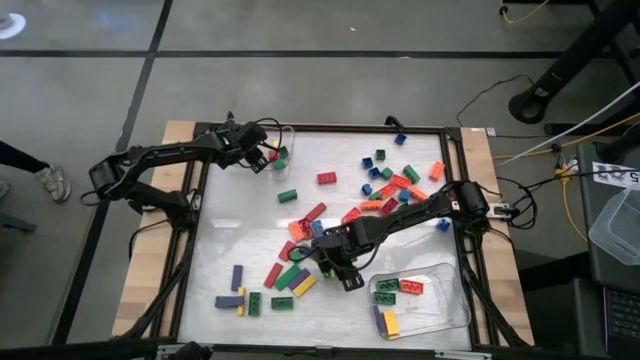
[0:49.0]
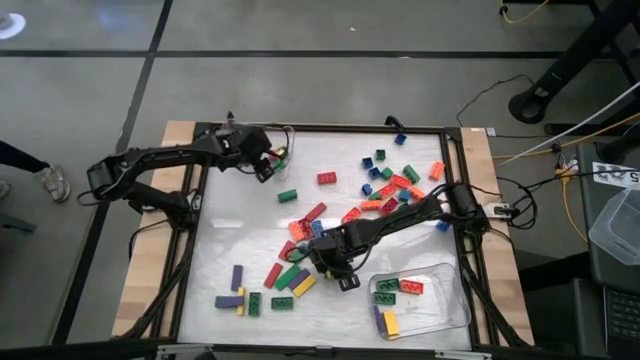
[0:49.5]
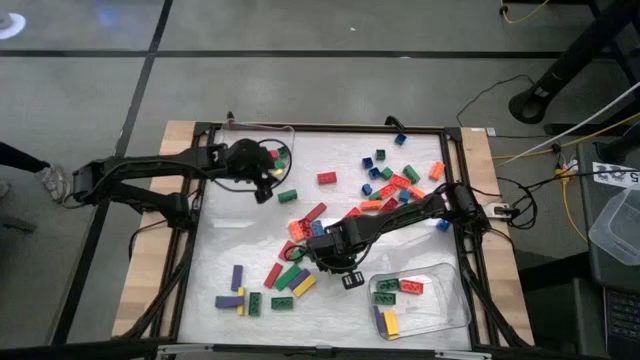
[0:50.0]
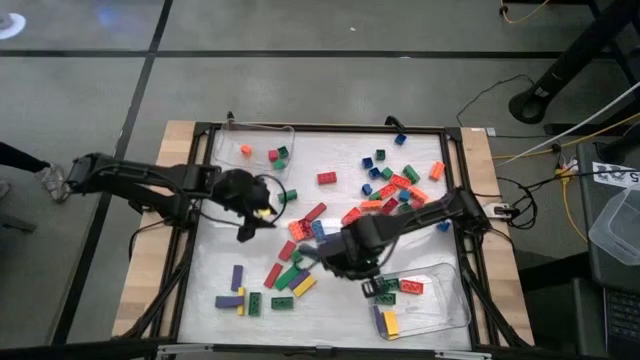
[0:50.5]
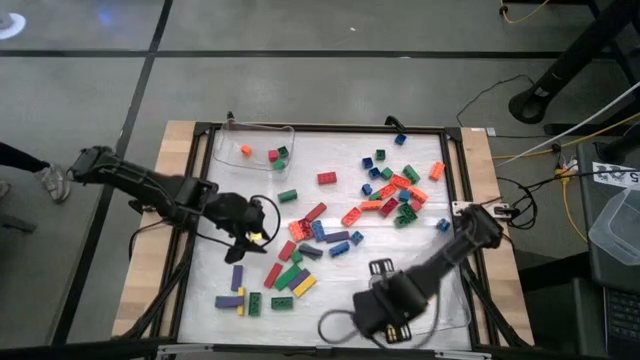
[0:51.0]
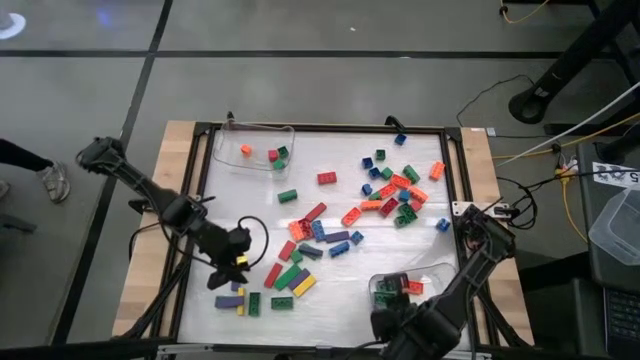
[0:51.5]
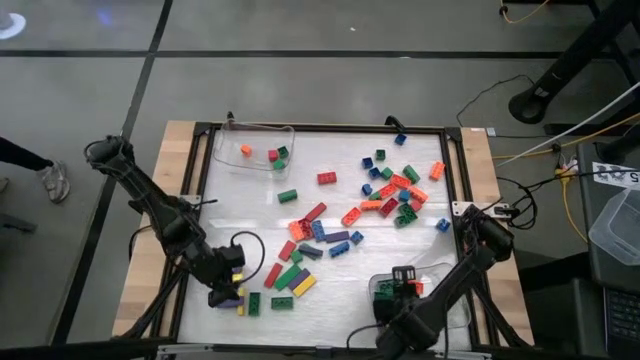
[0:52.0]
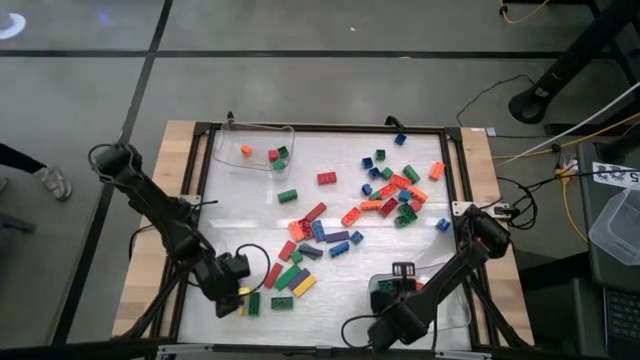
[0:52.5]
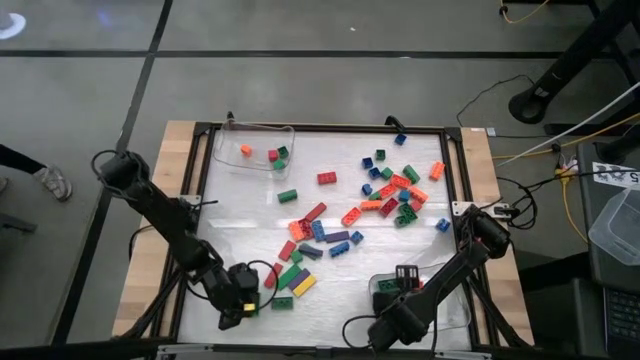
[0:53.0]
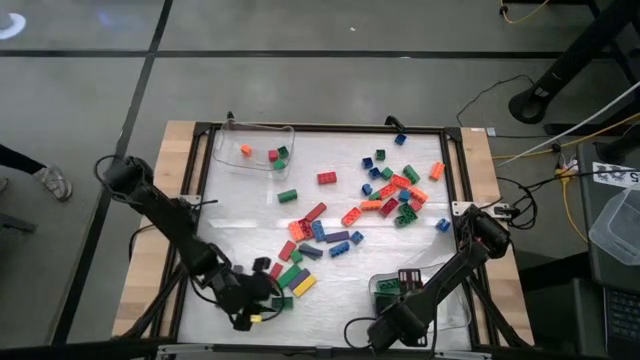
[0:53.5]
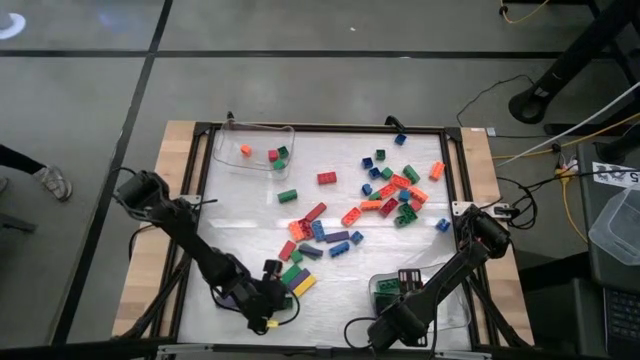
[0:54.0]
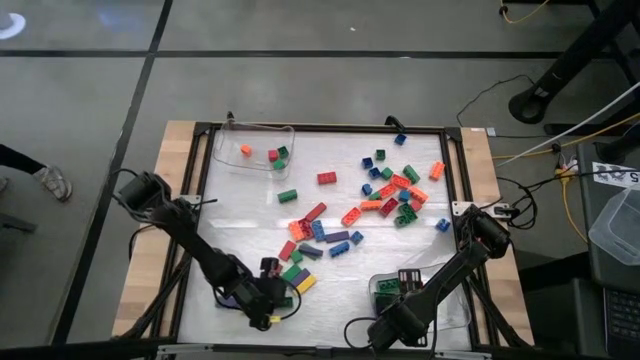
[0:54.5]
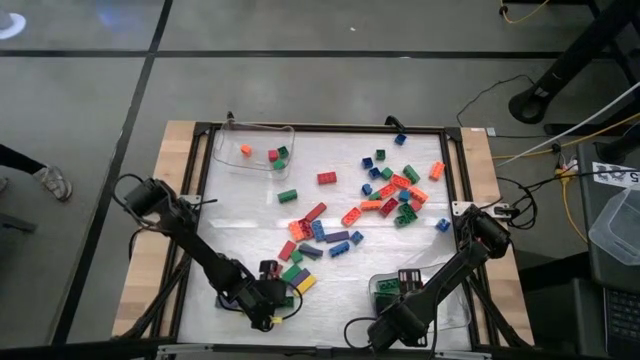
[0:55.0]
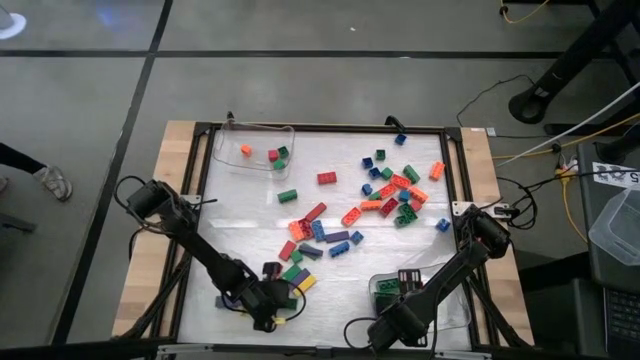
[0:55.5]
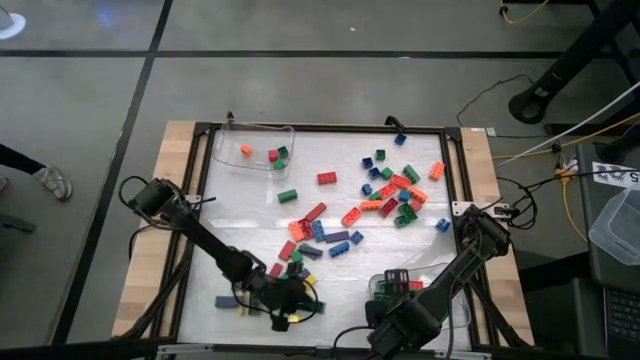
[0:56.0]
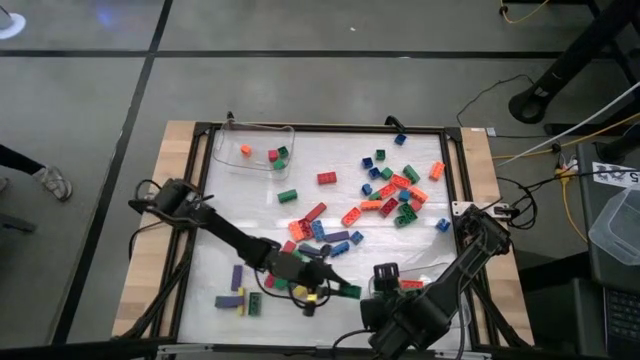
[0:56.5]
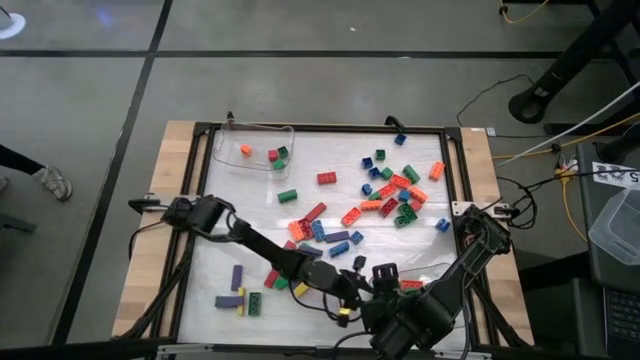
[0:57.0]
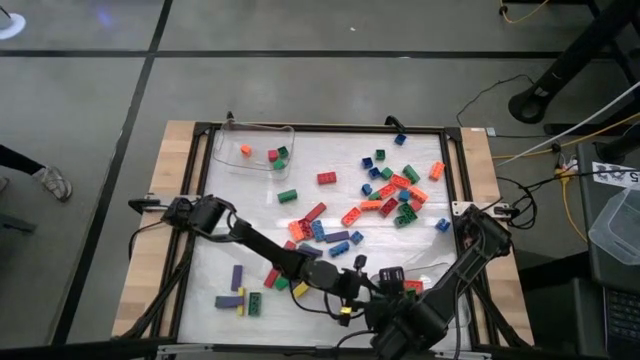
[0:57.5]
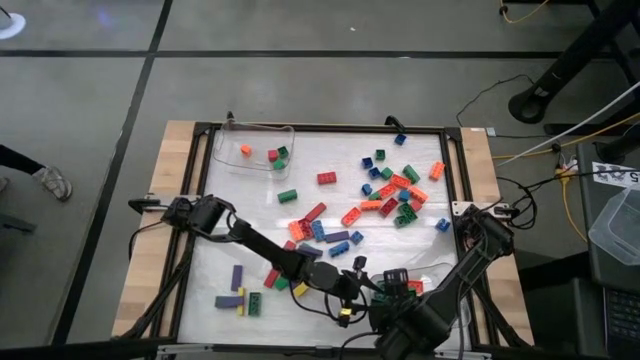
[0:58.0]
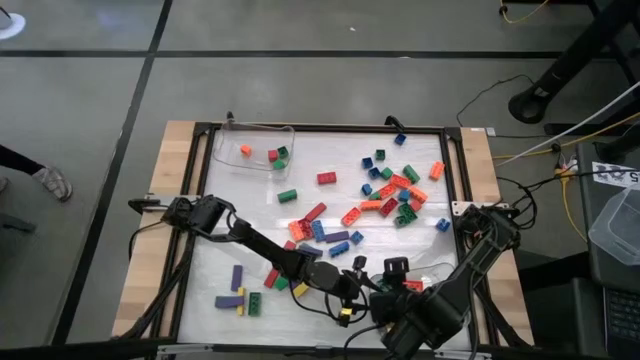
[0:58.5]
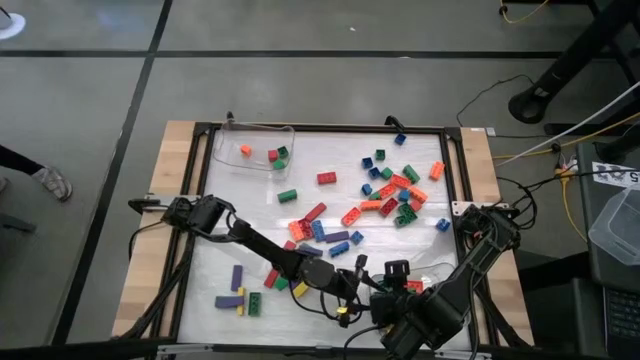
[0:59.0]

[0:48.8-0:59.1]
Task: Sort blocks by size
Put the rectangular green game piece into the bottom transparent bin

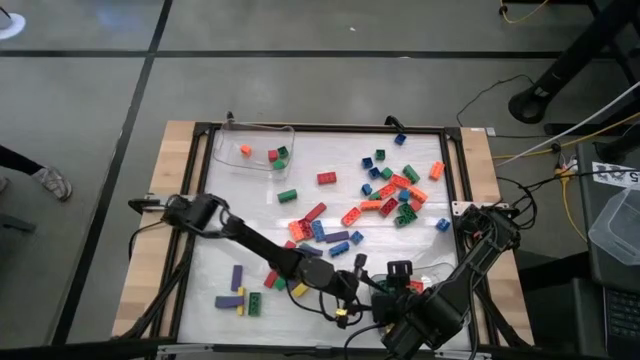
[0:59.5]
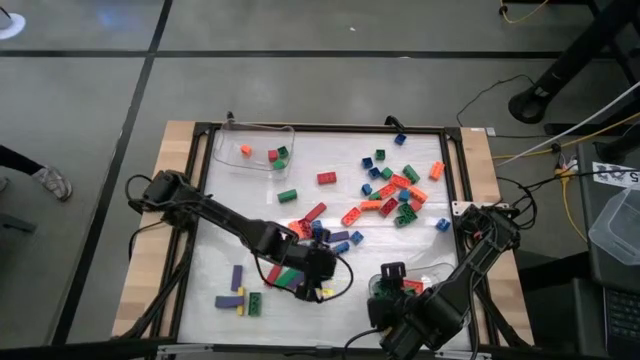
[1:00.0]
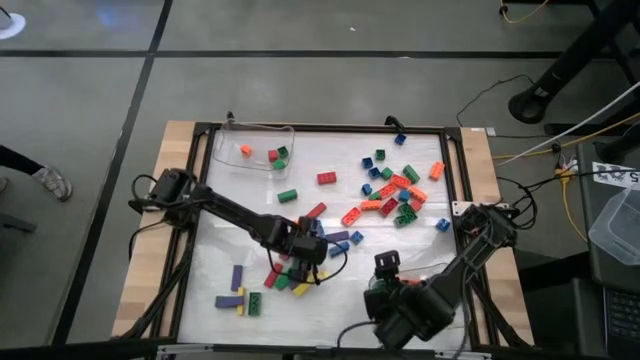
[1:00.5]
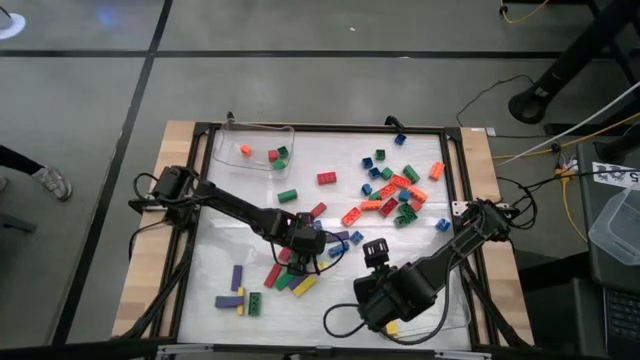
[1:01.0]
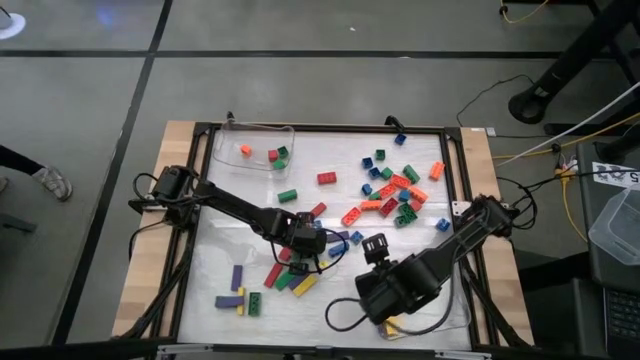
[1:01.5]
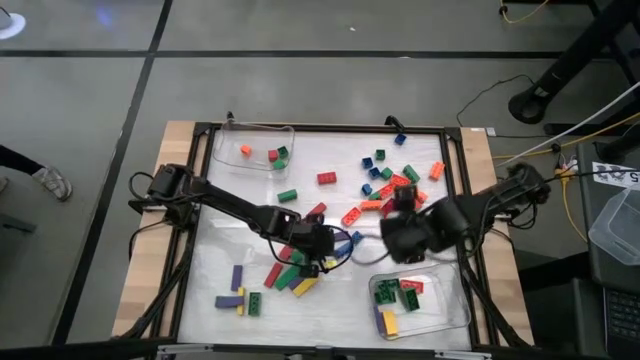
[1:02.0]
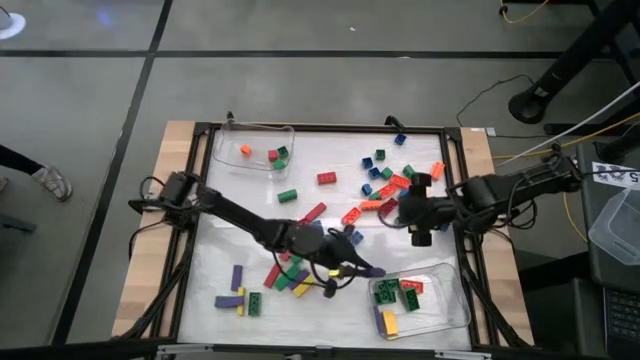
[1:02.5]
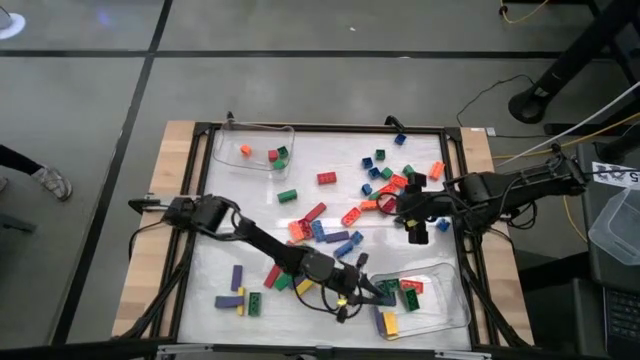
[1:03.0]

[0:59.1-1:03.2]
Put the rectangular violet block into the bottom transparent bin

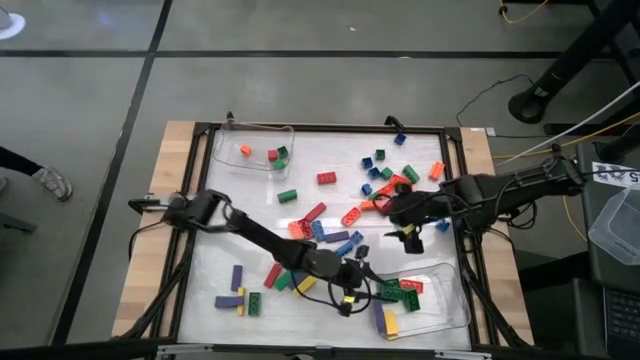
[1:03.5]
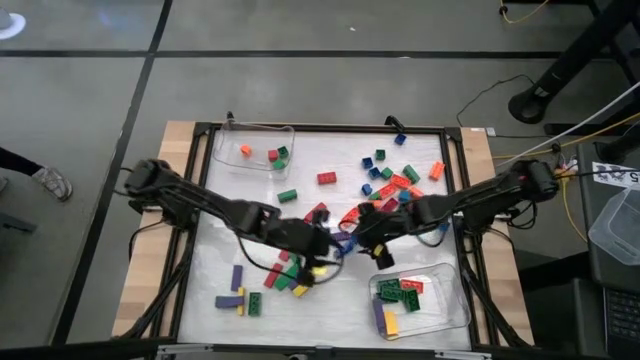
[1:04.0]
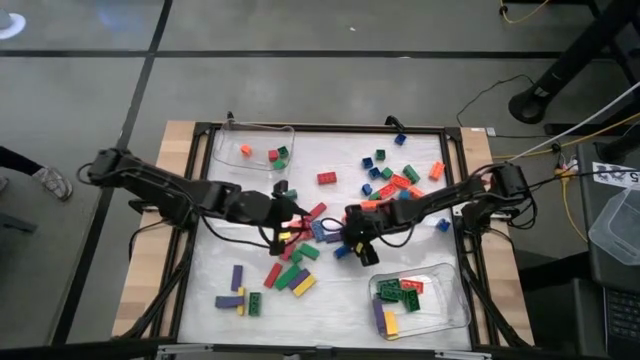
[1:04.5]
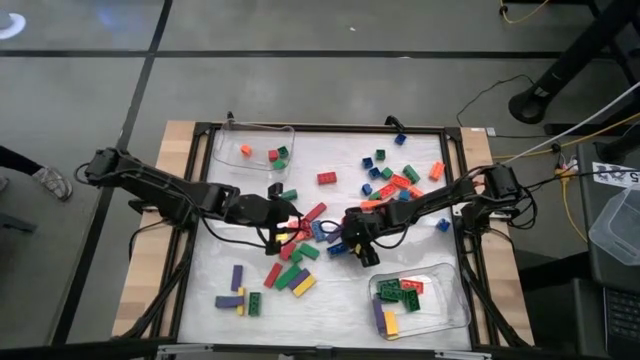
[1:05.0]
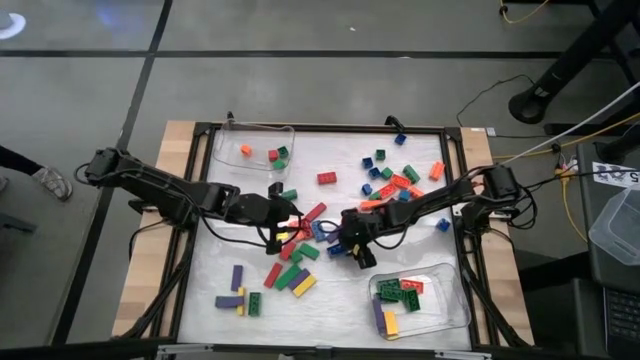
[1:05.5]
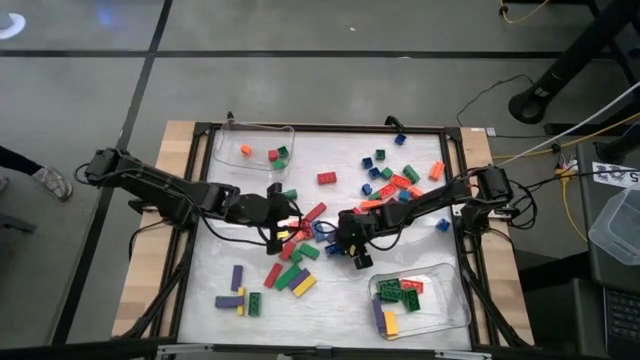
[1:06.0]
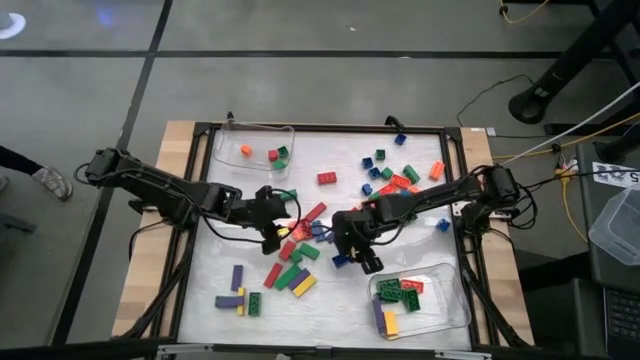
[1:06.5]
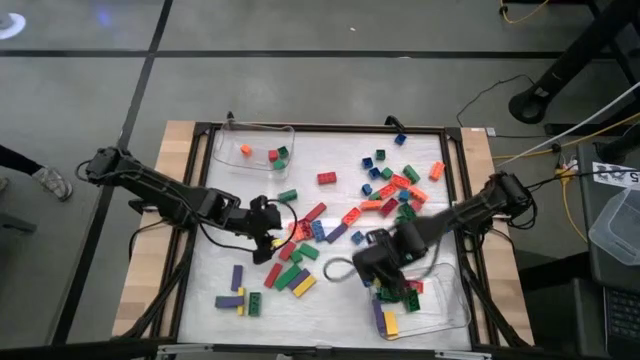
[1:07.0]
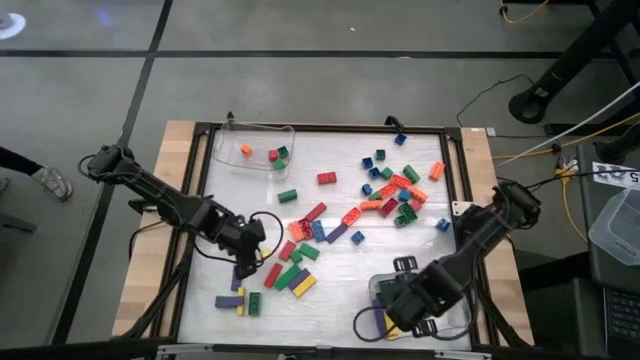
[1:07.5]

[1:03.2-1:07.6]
Put the rectangular blue game piece into the bottom transparent bin

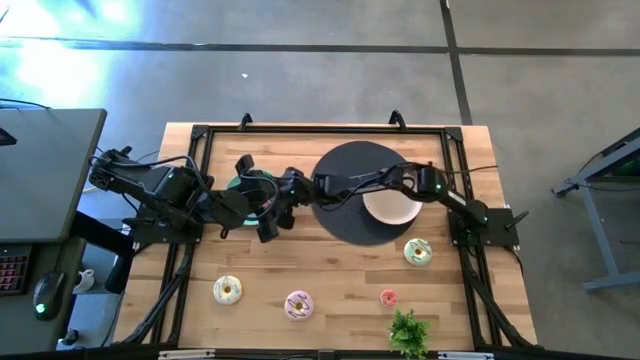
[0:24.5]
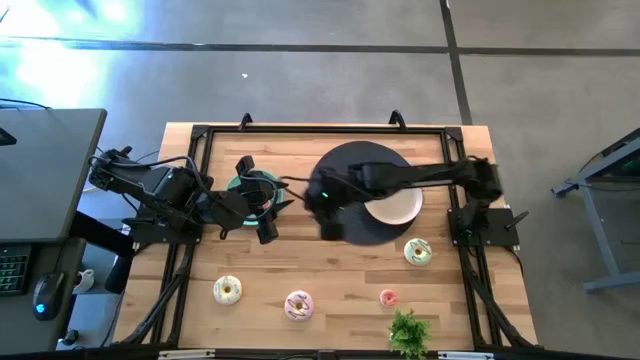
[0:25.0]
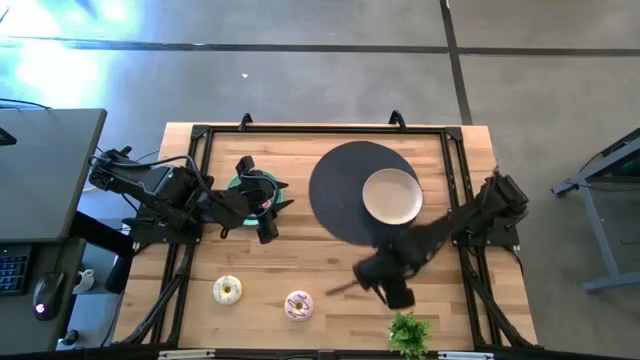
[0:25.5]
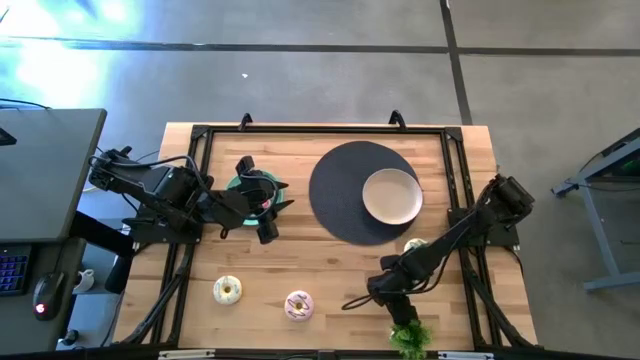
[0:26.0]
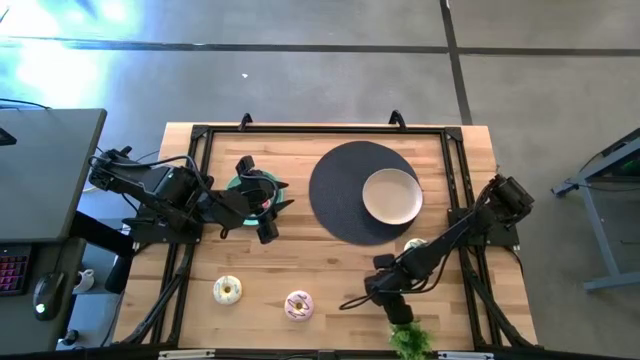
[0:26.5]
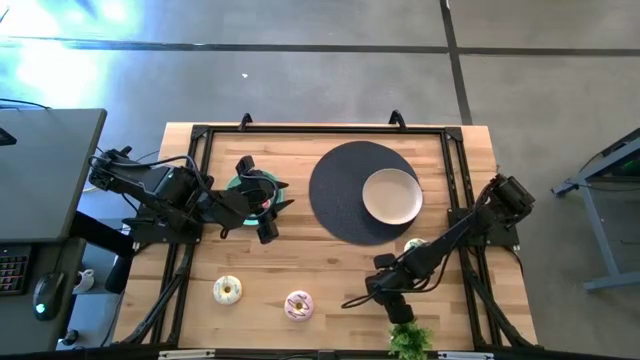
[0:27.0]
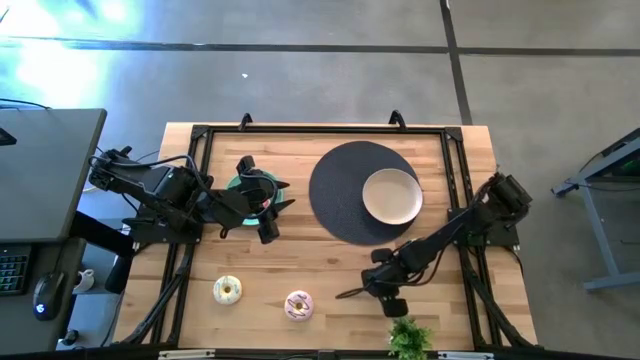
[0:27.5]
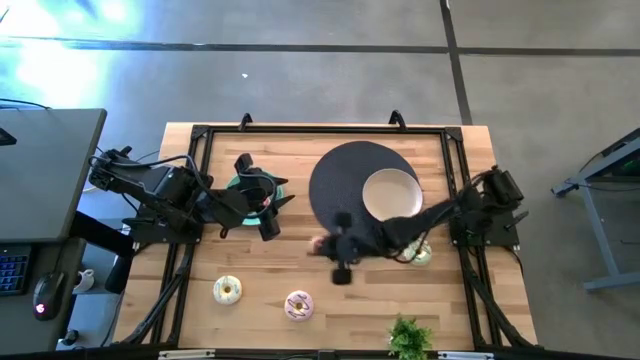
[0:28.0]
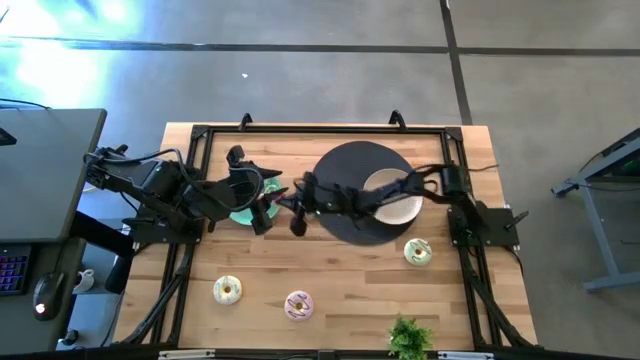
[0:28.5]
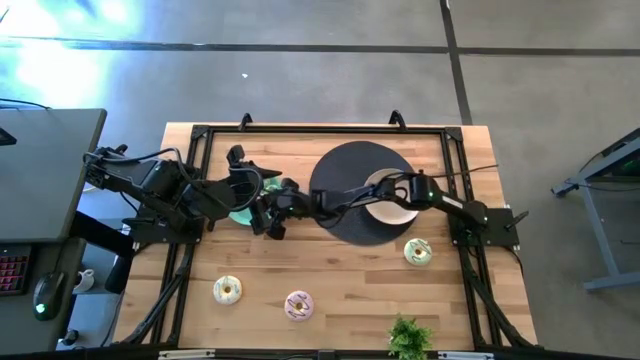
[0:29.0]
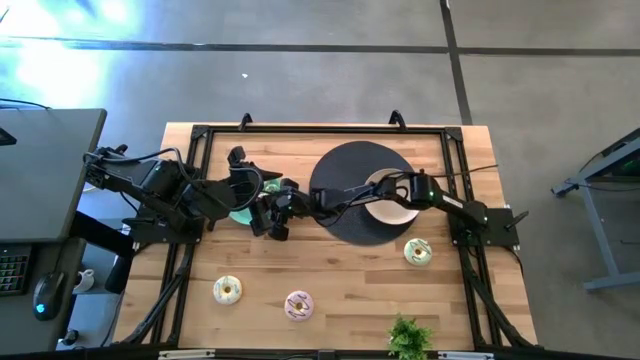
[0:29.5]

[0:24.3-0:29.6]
Task: Pick & Place donuts
Put the small pink donut onto the blue plate
